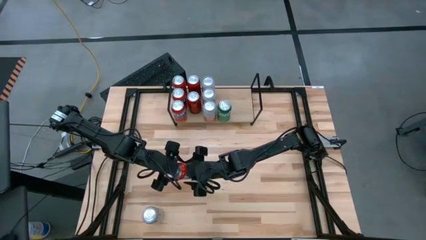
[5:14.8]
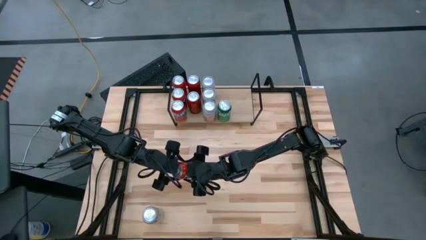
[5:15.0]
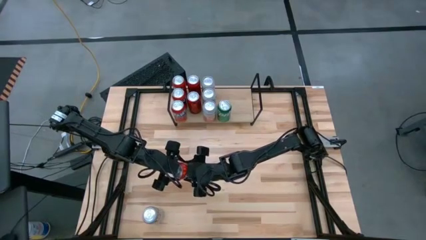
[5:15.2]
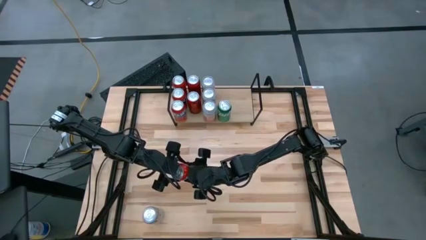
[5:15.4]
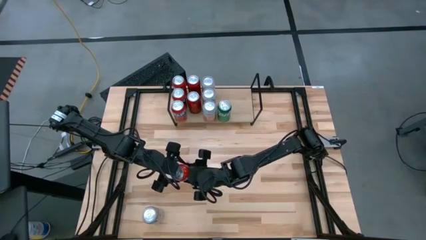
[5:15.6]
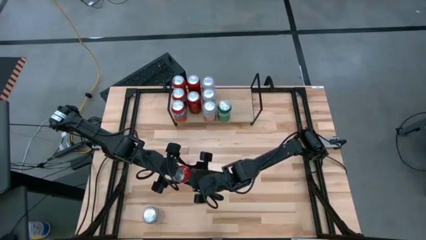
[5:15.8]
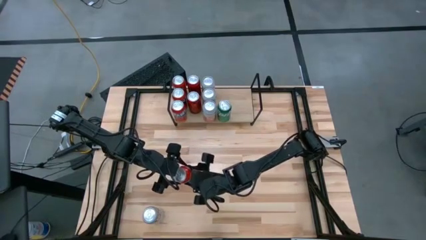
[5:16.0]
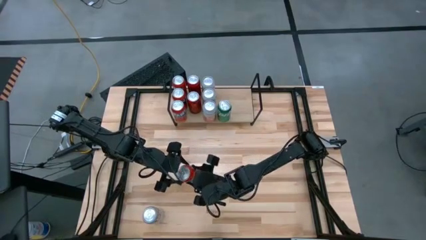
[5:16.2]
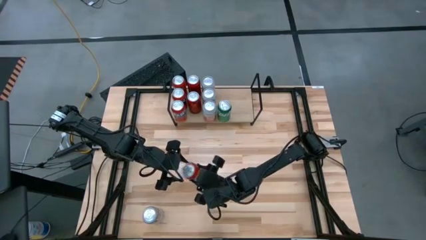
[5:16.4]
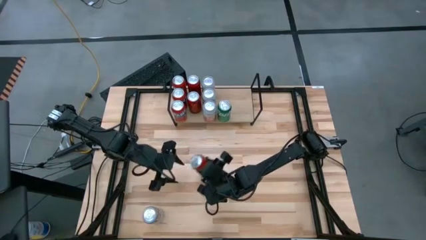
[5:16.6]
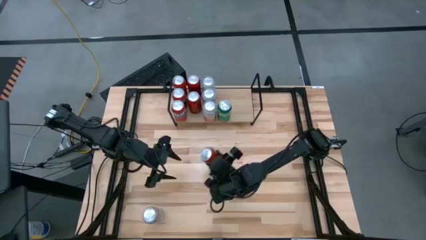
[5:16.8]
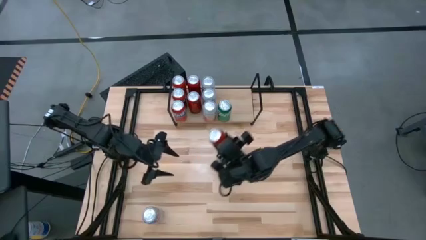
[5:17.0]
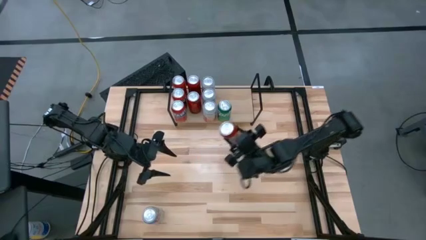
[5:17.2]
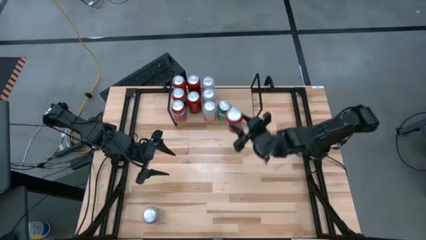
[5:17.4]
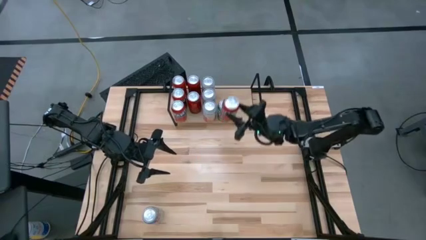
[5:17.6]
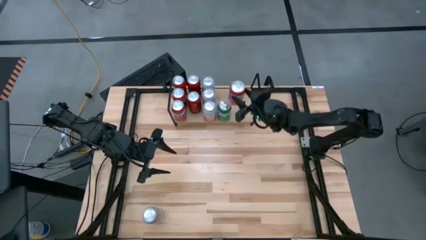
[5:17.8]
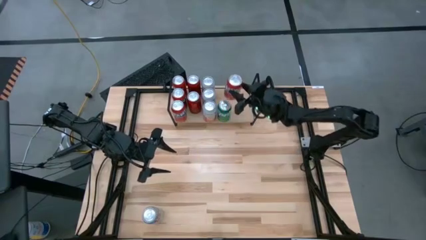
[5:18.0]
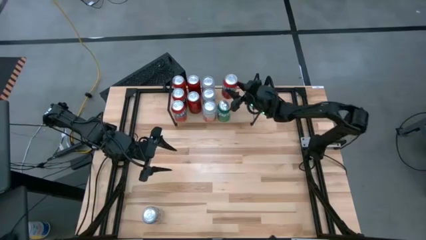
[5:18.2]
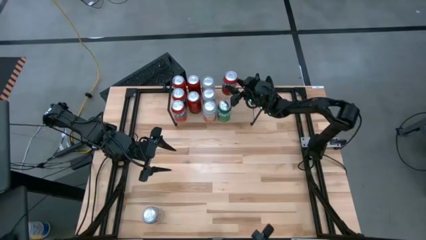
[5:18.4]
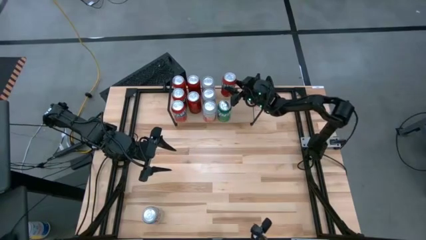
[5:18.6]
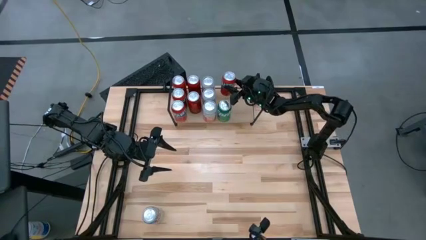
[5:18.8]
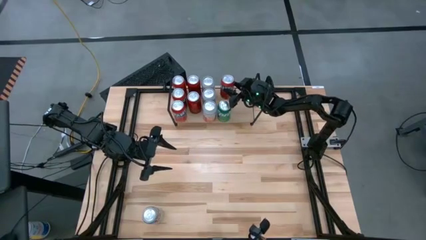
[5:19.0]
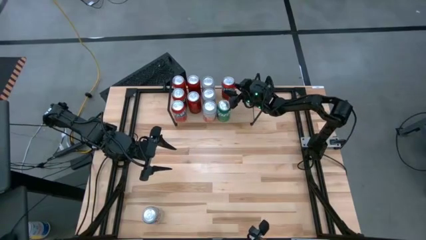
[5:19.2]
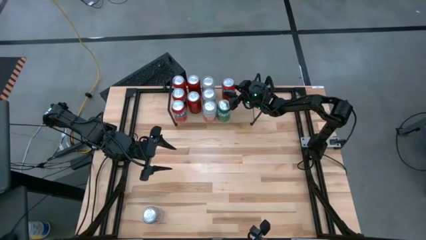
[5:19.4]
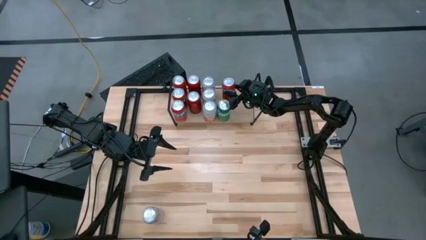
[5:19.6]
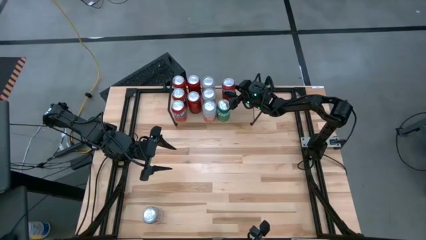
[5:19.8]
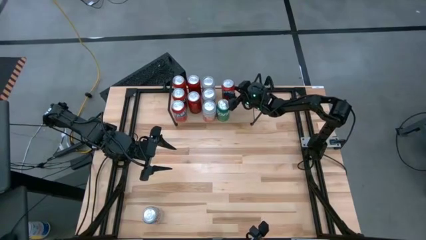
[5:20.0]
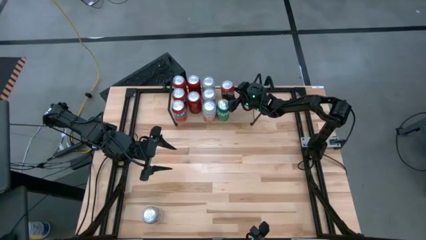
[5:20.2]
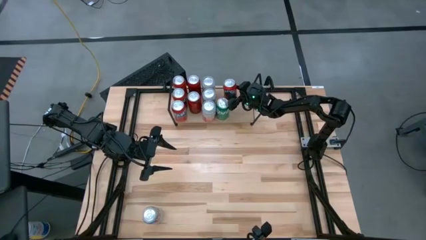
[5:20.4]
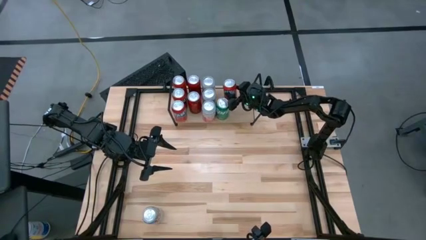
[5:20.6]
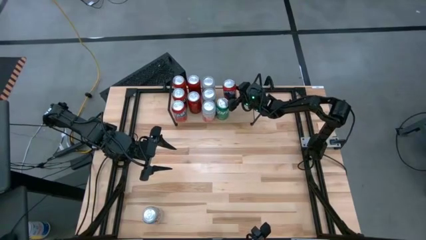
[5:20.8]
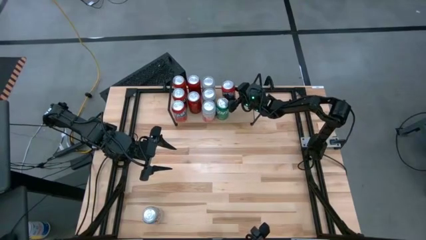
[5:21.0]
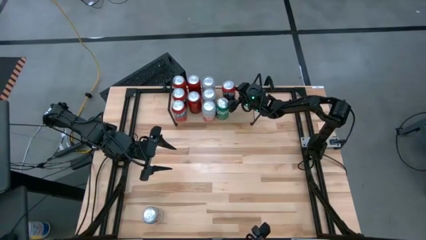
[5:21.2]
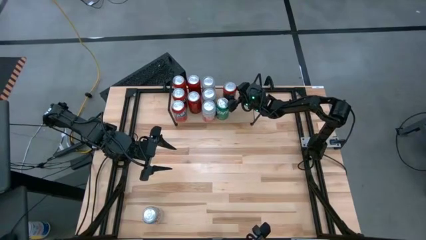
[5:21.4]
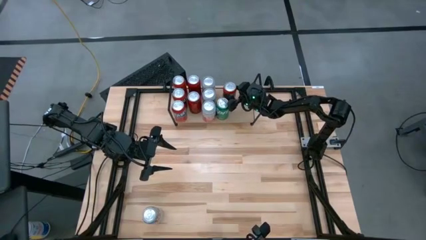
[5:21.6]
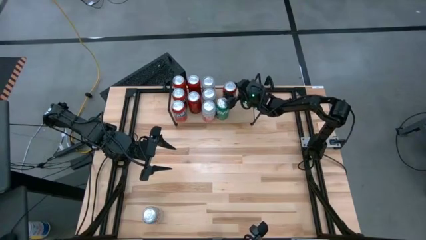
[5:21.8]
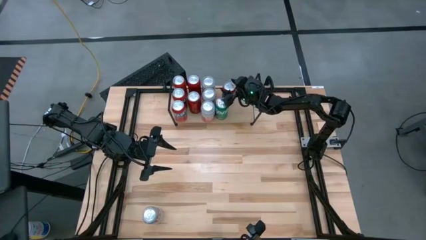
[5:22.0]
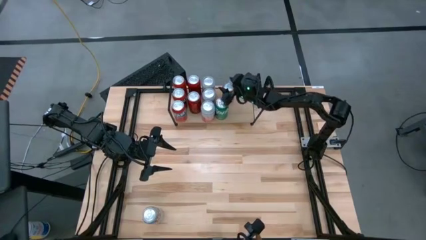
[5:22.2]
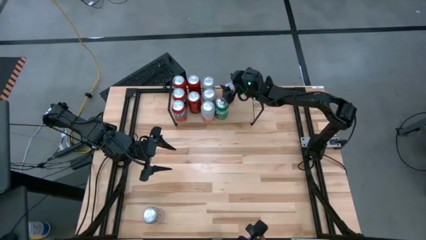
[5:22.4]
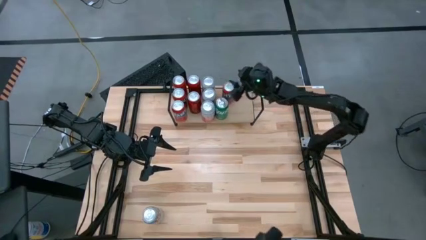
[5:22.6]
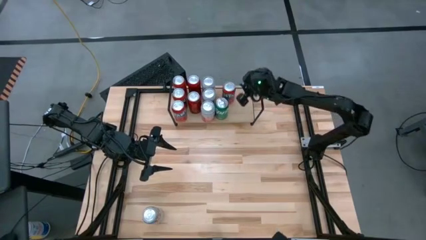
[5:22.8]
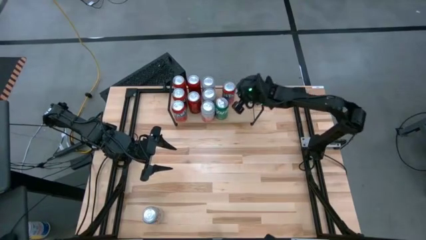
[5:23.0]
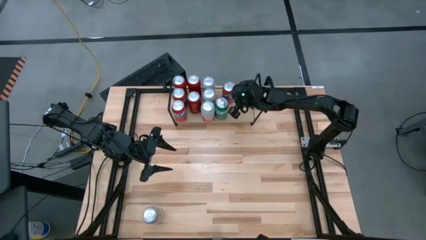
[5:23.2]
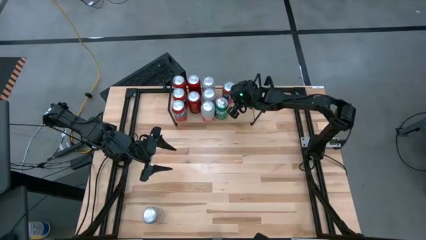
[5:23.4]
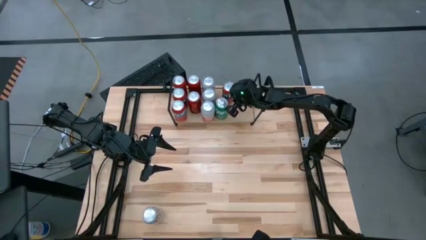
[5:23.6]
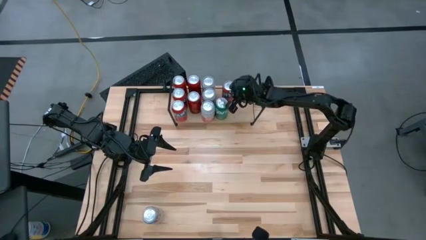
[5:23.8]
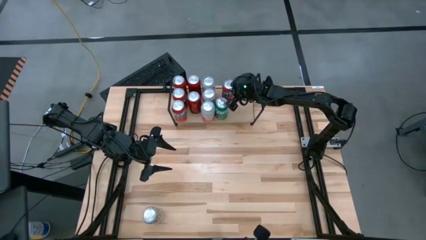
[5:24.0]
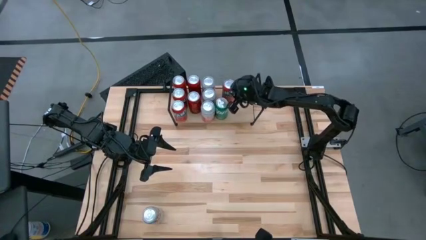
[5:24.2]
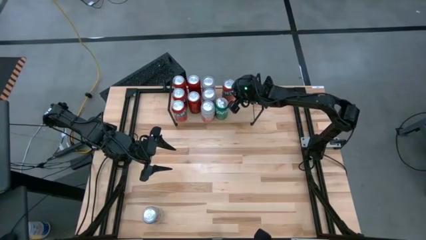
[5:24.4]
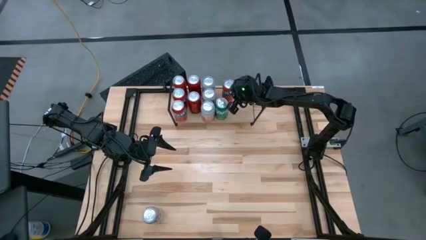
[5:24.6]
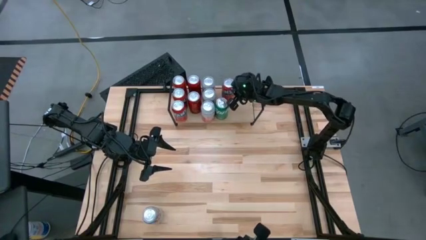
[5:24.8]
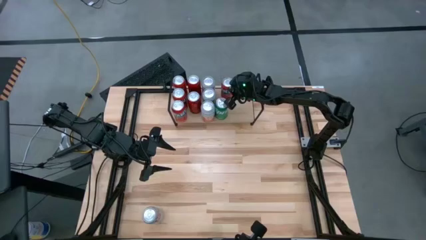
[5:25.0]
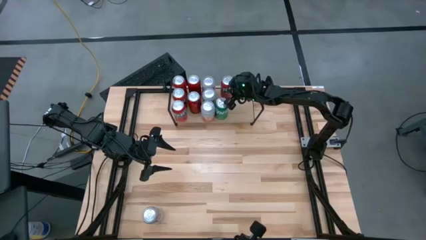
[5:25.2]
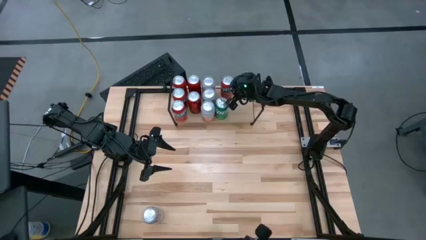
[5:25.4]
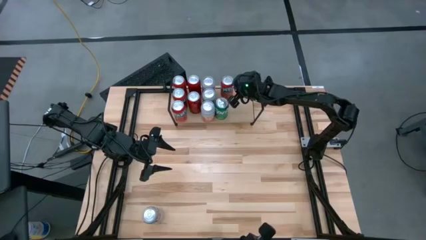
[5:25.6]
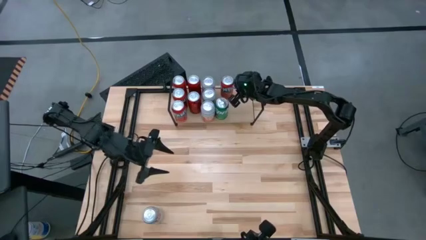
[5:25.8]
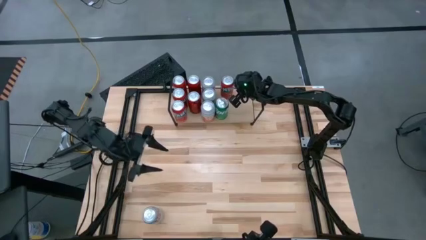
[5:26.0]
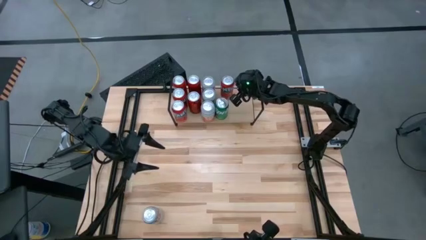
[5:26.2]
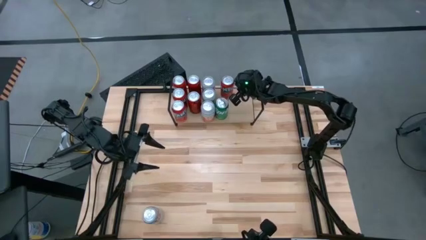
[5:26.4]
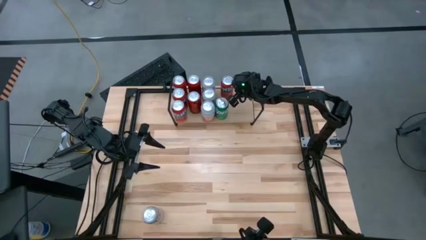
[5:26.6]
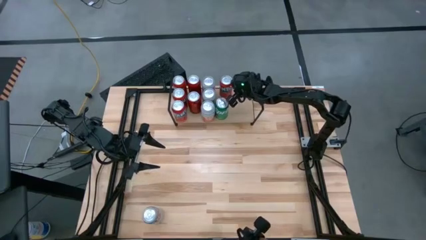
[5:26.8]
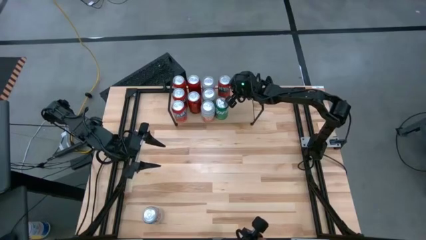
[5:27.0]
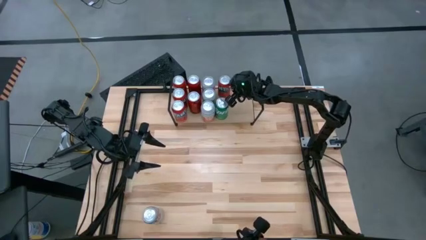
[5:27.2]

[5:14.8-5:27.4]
Task: Place canned beverage on shelf
Put the red soda can on the shelf

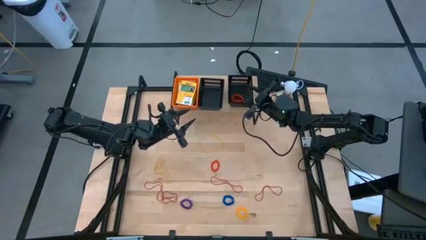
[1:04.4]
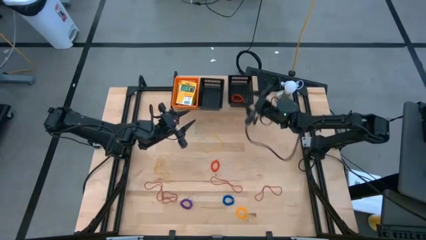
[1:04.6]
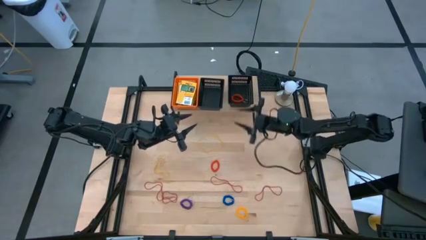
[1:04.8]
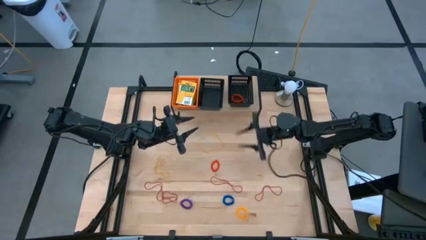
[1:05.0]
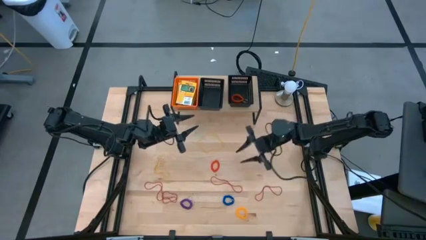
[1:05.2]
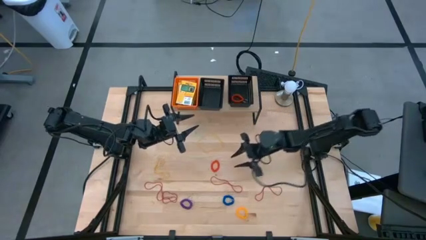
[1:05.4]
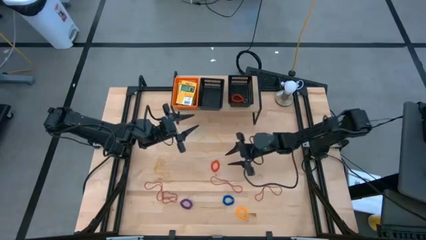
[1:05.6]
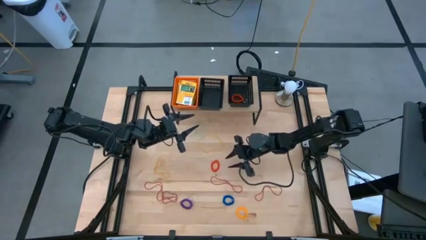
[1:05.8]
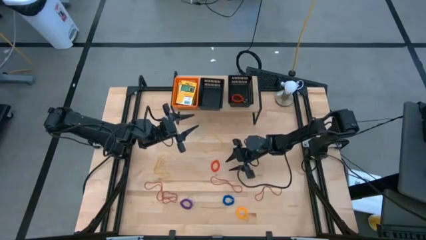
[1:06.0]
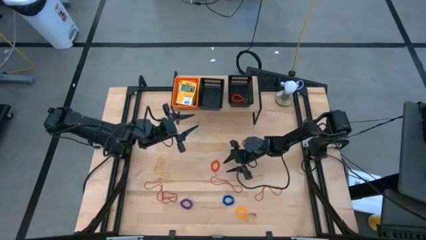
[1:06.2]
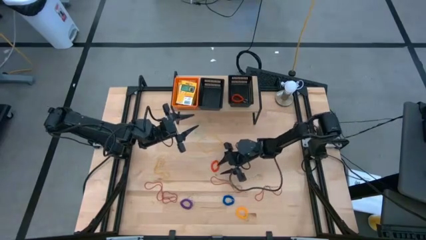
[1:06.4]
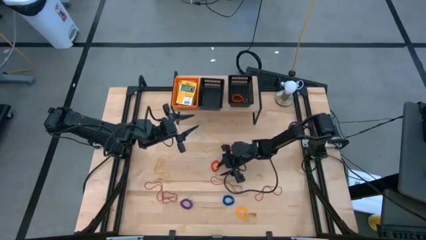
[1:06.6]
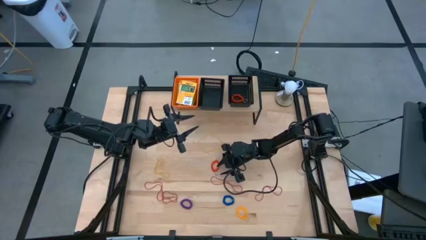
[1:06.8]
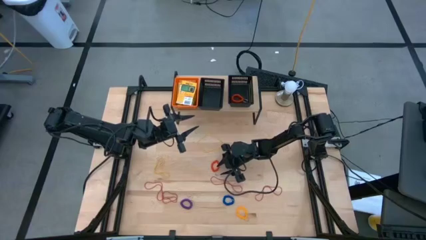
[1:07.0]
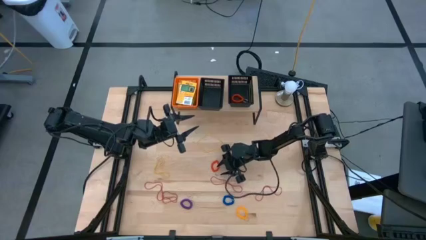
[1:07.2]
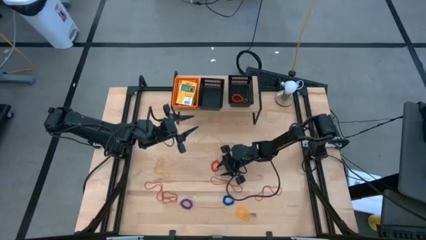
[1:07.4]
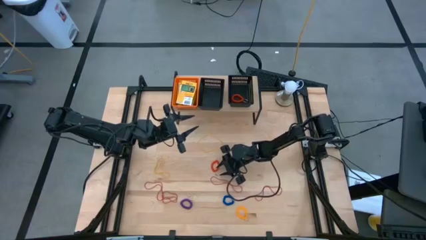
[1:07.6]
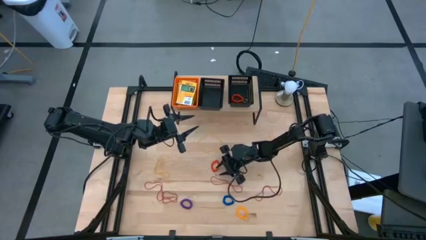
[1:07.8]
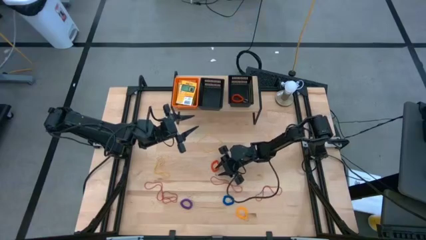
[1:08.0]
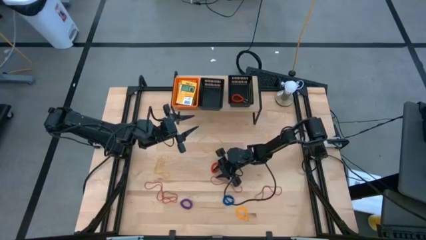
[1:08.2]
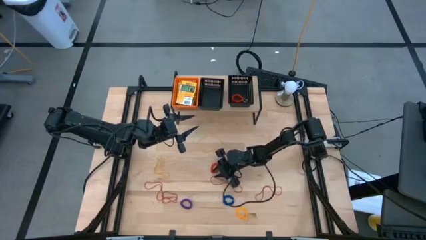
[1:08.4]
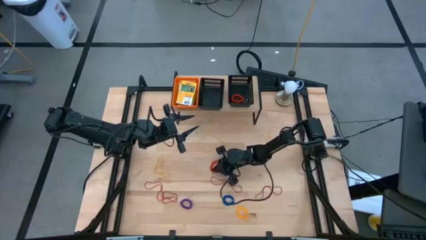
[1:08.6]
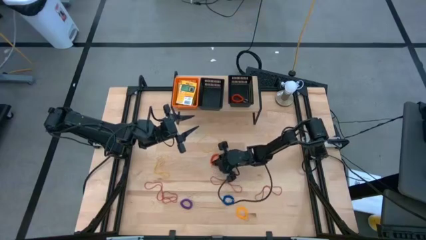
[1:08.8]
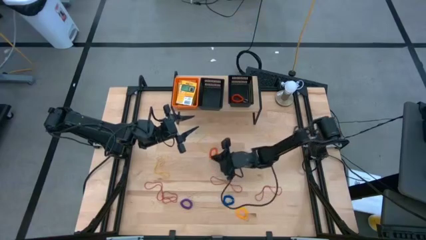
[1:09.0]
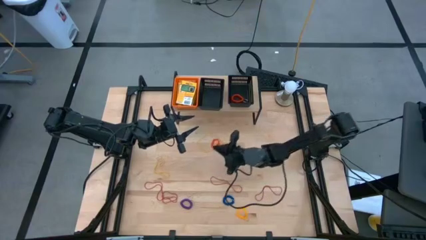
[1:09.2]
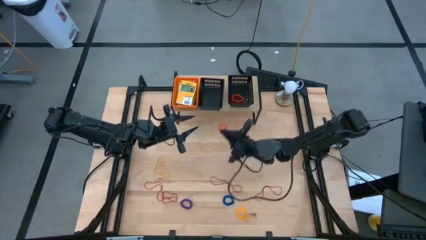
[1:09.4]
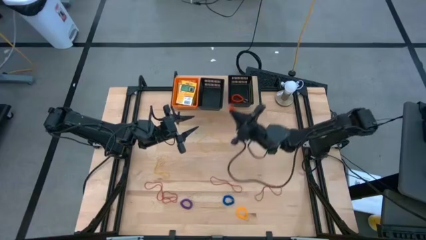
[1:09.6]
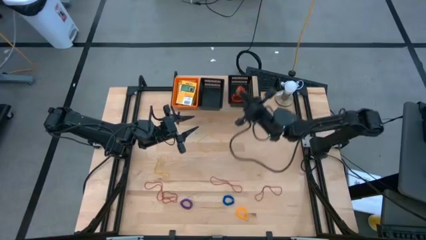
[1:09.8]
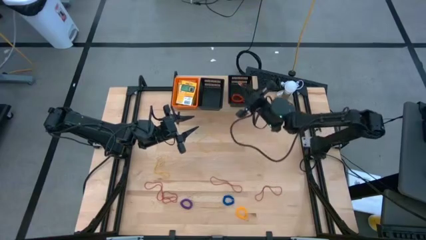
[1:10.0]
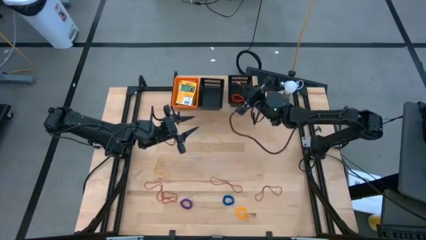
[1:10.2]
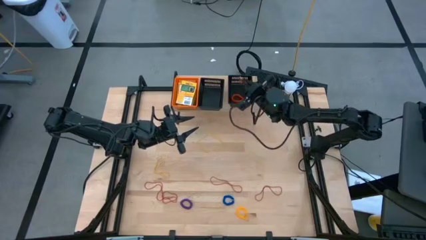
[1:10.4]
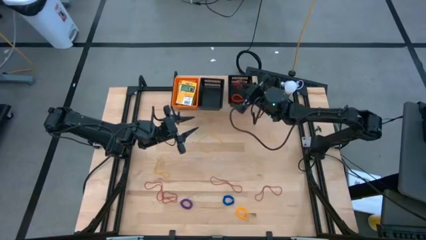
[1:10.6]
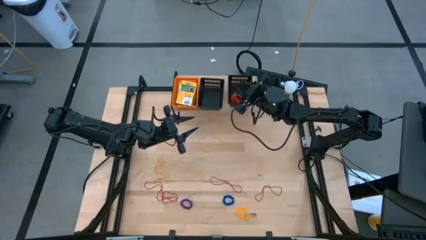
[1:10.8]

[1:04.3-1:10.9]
Task: Pick & Place Office Desk Supplies
Put the orange spring keychain into the right black bin on the shelf
